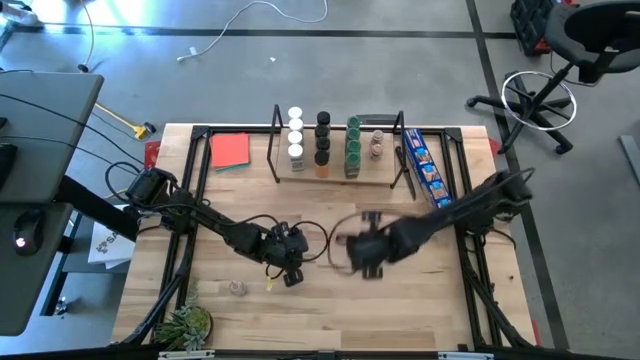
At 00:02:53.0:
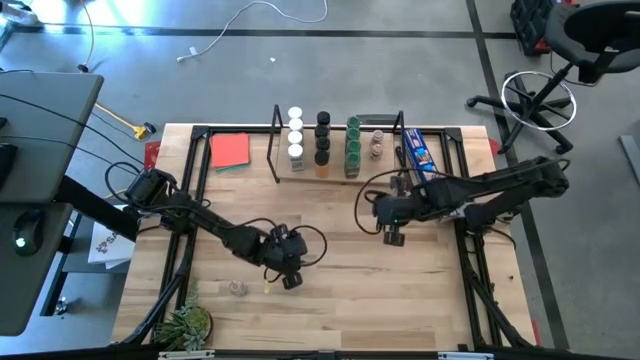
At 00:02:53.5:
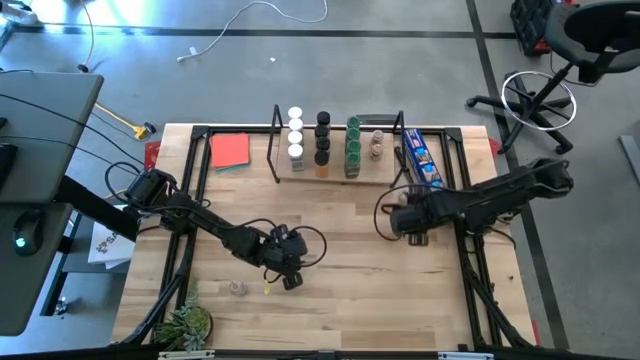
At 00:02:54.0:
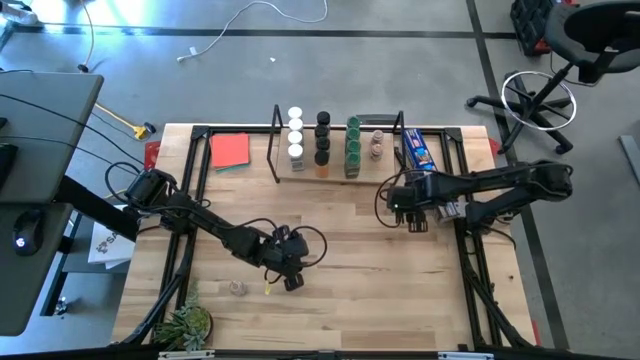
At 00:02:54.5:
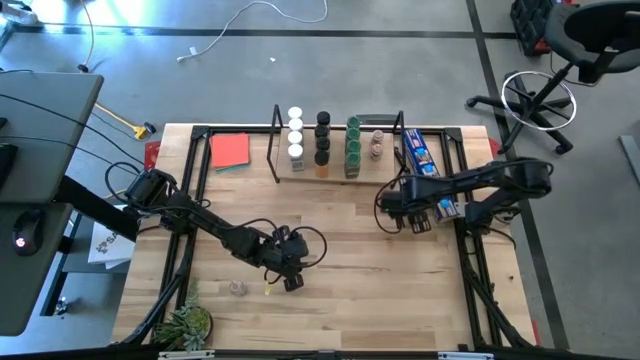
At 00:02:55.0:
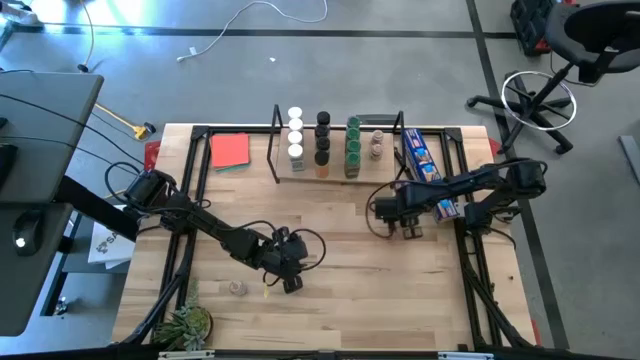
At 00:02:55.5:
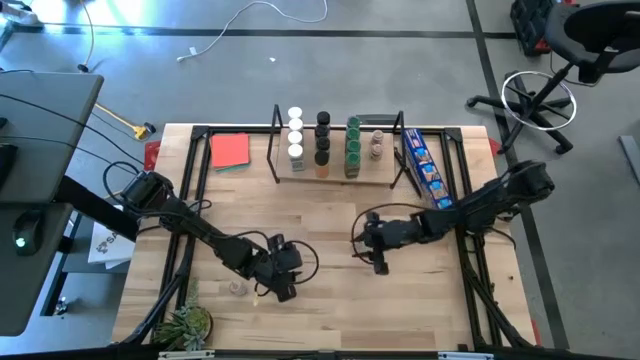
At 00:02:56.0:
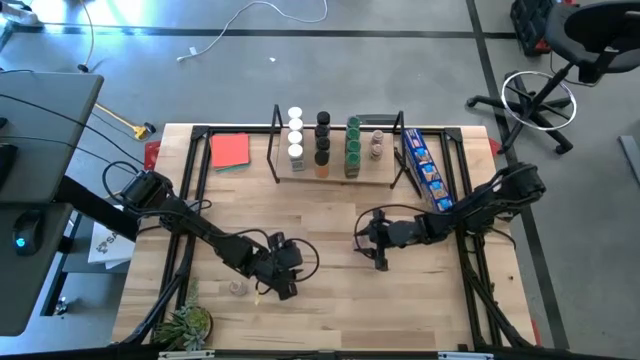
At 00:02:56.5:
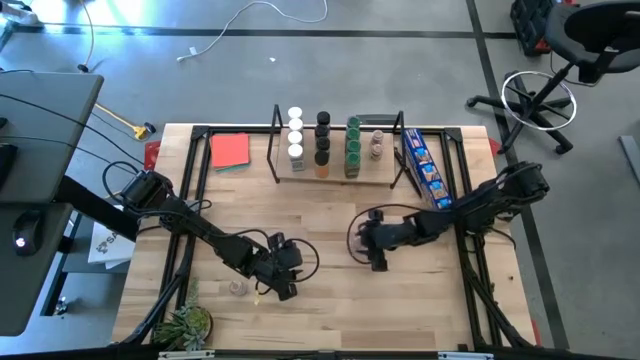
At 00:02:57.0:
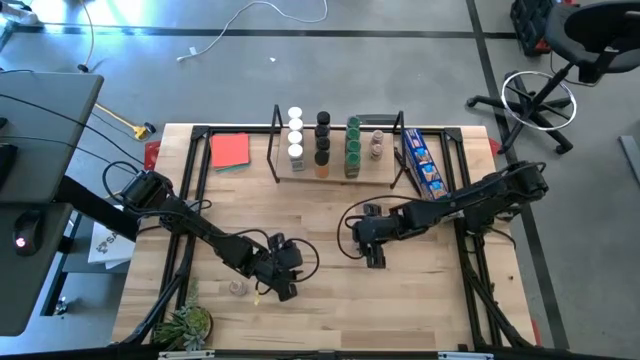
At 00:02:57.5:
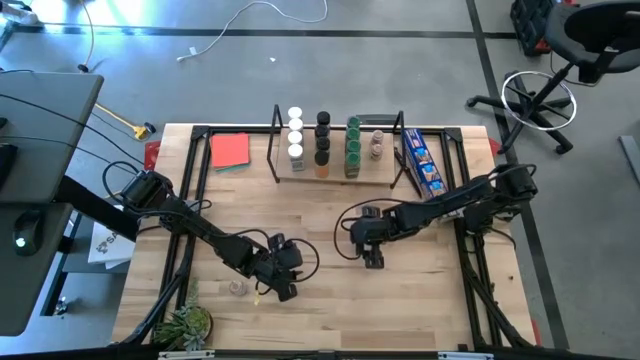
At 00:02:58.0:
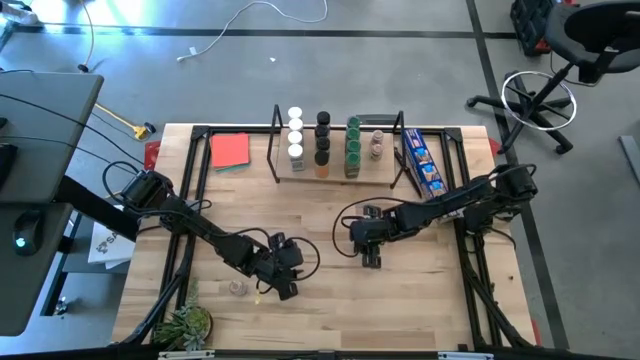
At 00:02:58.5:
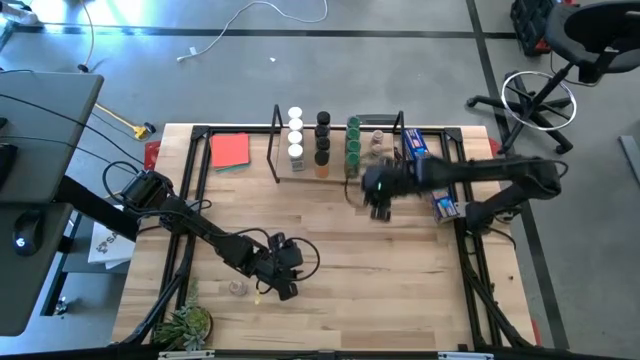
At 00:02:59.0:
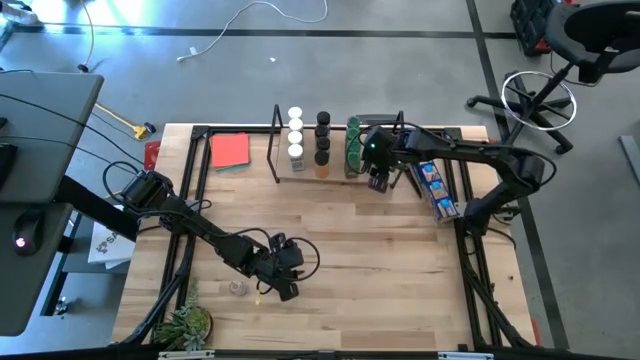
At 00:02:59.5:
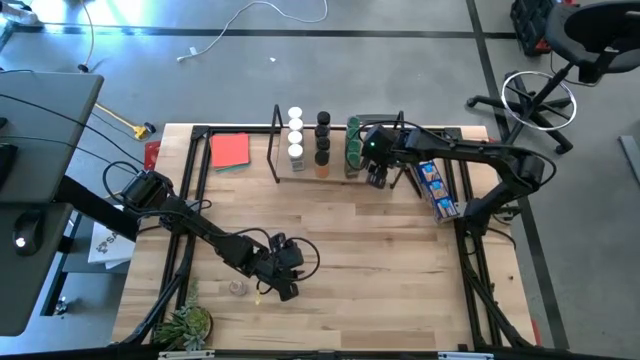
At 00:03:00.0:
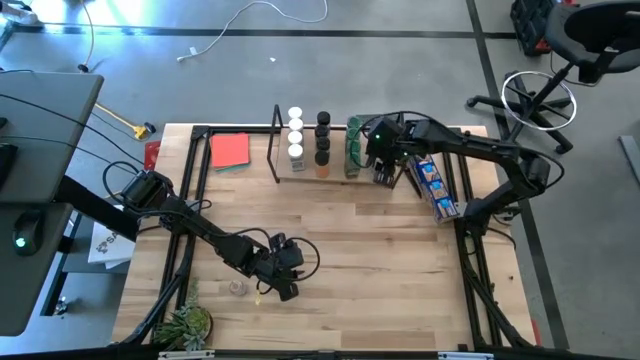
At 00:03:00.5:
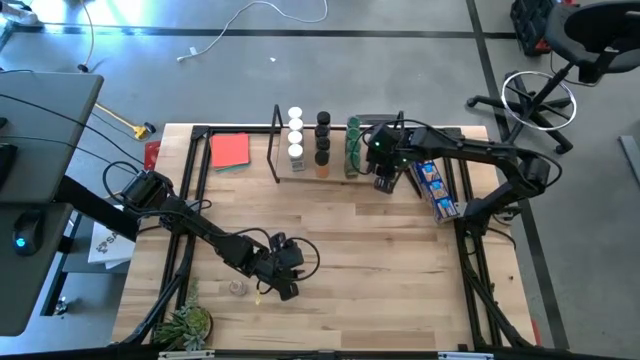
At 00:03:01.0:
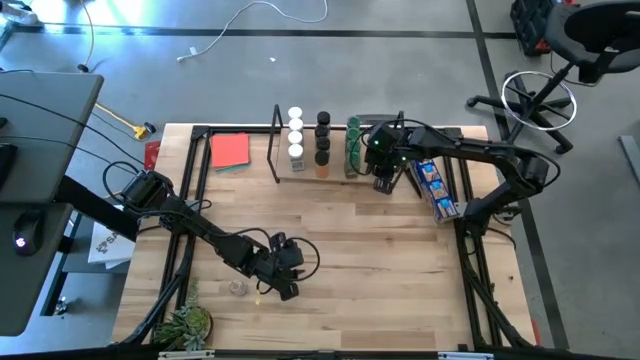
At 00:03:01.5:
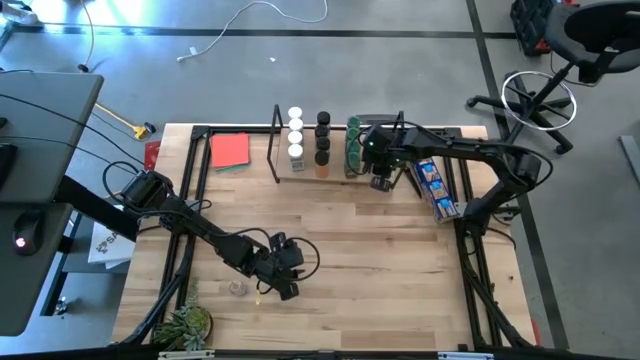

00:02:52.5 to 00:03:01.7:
Task: Shelf spices
Put the brown seasoning bottle on the shelf aligned with the other brown seasoning bottles

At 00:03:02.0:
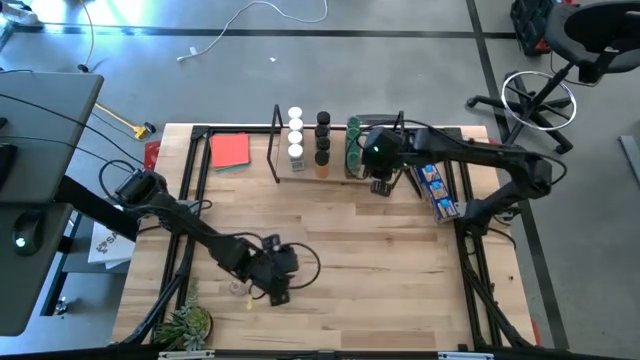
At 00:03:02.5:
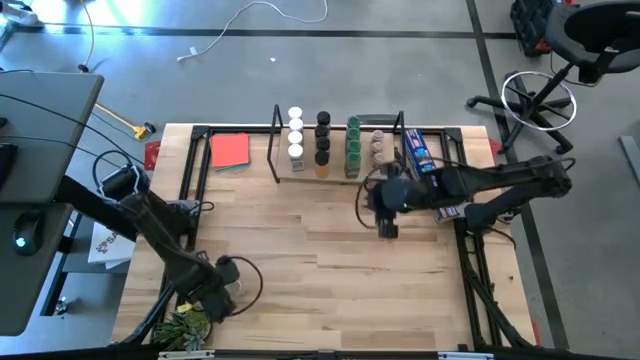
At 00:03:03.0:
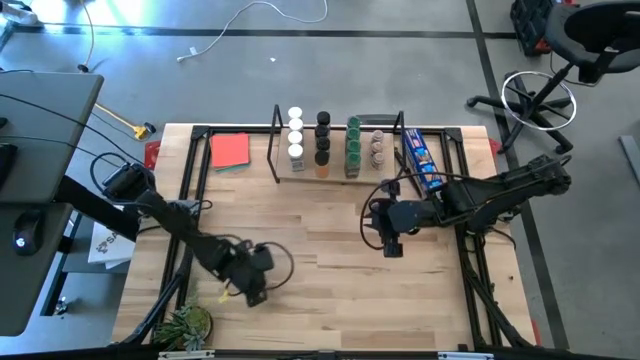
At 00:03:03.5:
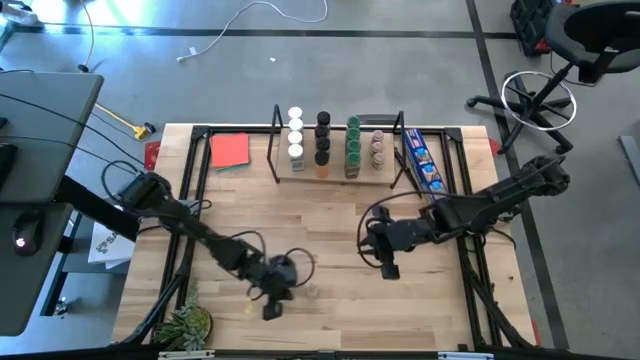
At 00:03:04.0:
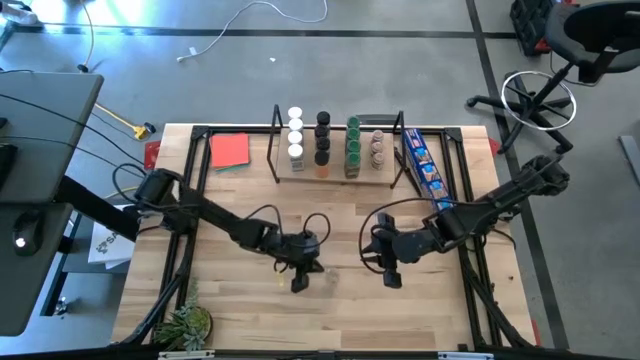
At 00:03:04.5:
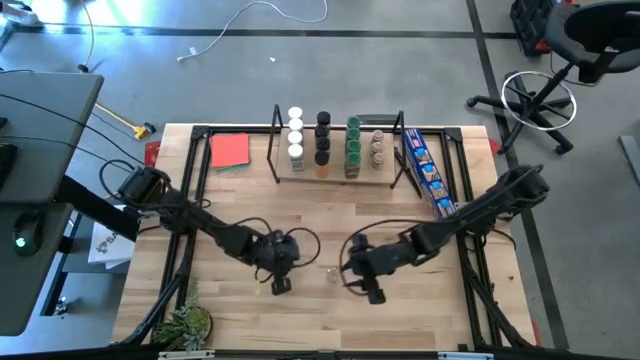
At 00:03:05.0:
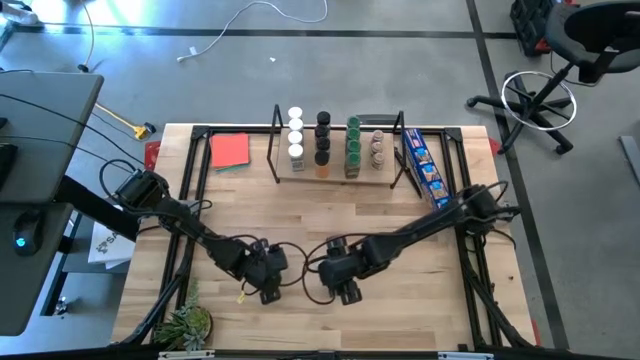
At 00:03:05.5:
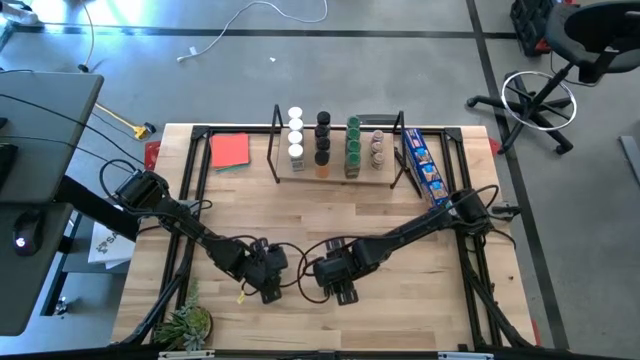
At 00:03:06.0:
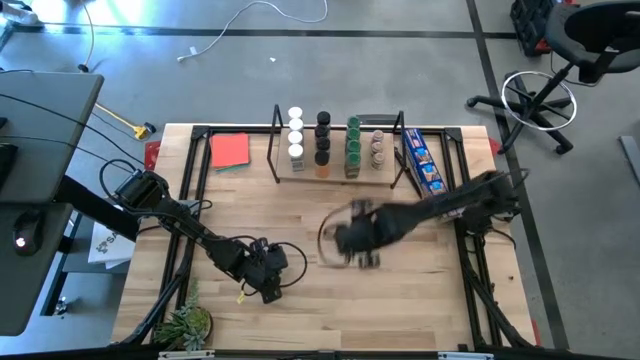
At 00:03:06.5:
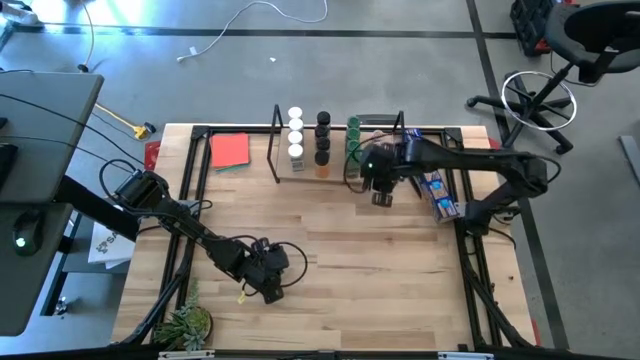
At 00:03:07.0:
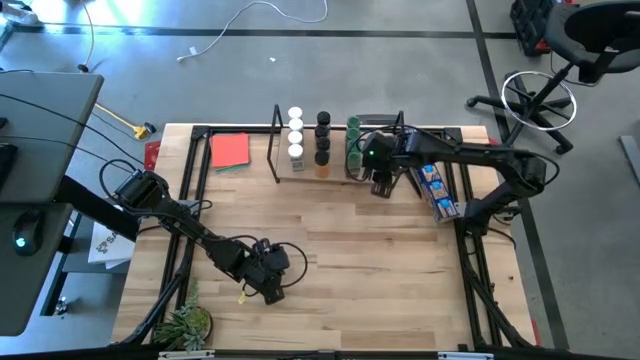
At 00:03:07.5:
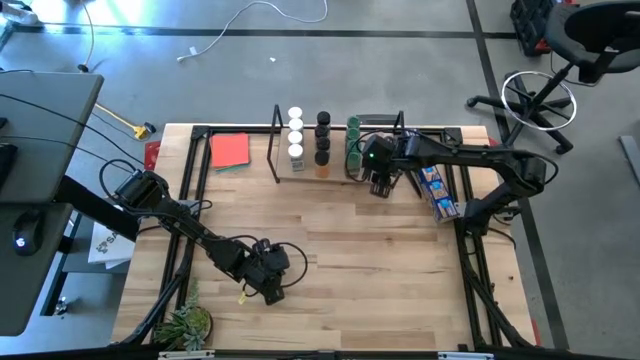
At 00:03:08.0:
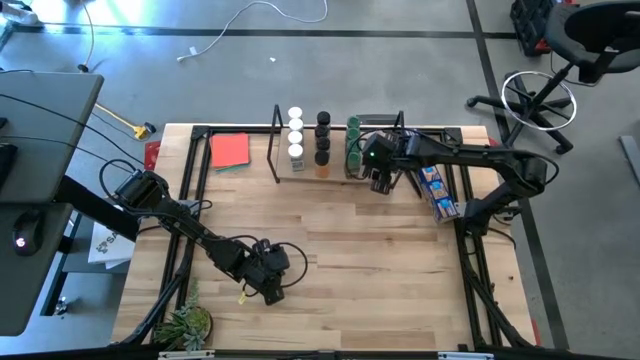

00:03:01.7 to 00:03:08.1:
Put the brown seasoning bottle on the shelf aligned with the other brown seasoning bottles

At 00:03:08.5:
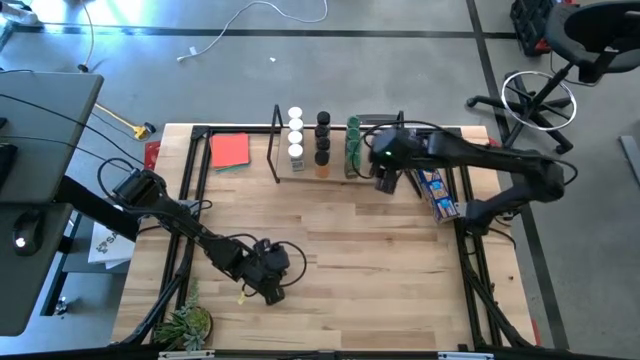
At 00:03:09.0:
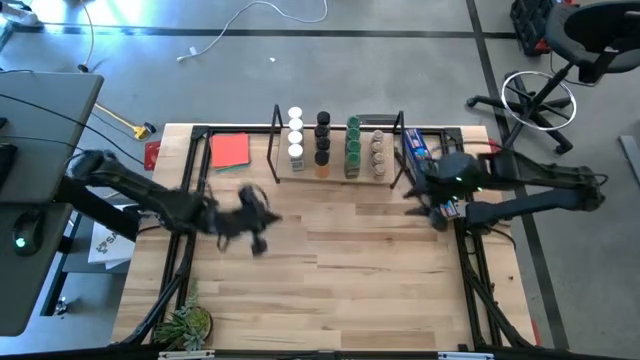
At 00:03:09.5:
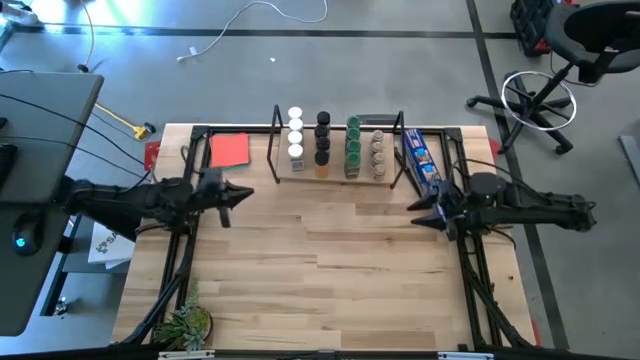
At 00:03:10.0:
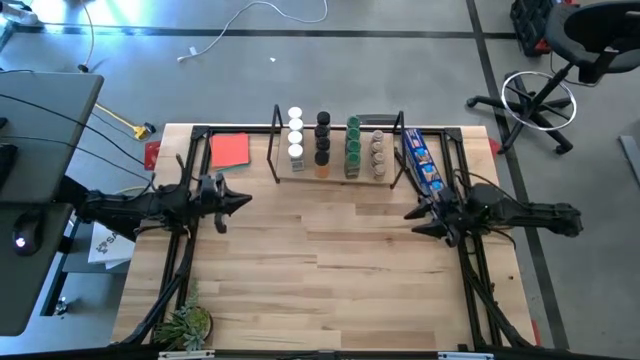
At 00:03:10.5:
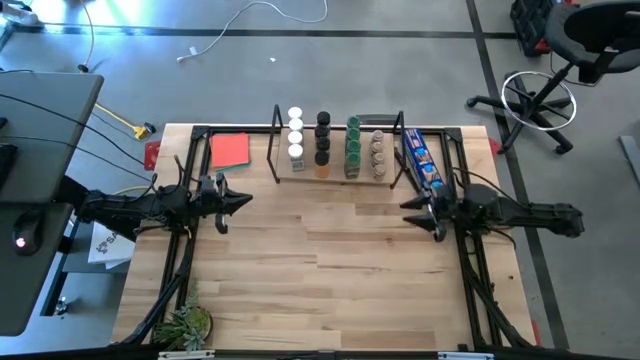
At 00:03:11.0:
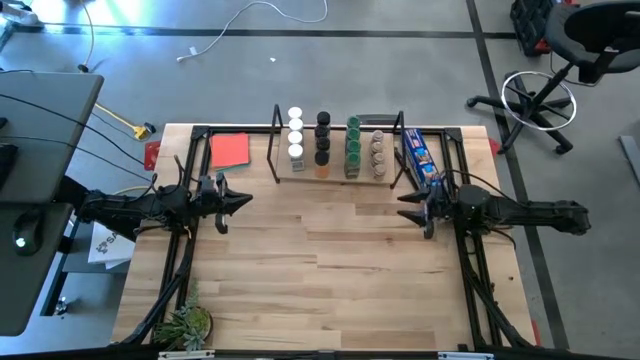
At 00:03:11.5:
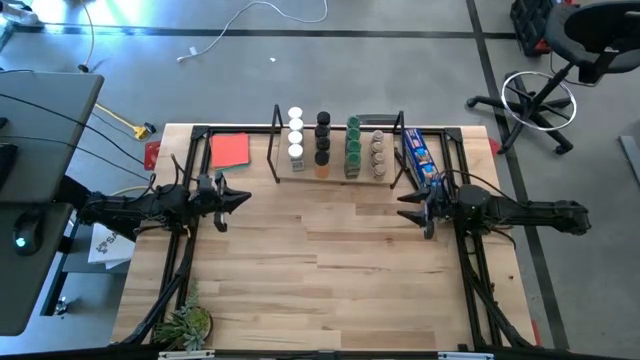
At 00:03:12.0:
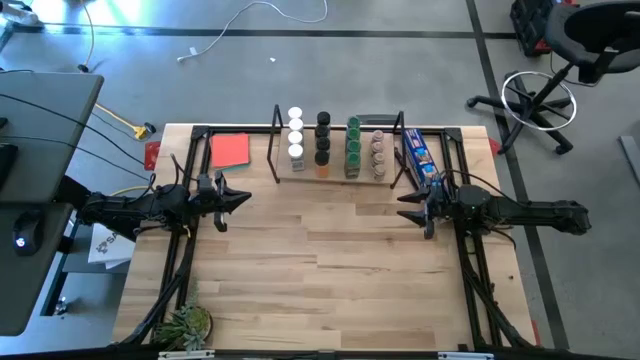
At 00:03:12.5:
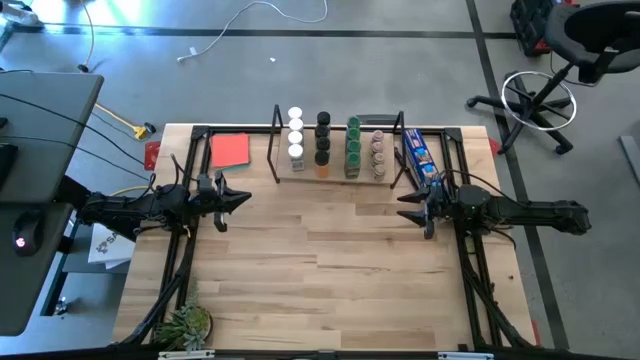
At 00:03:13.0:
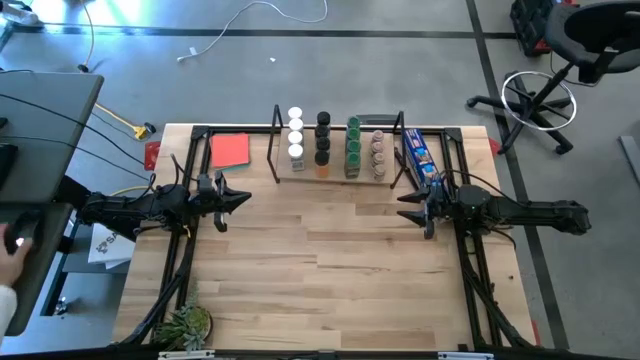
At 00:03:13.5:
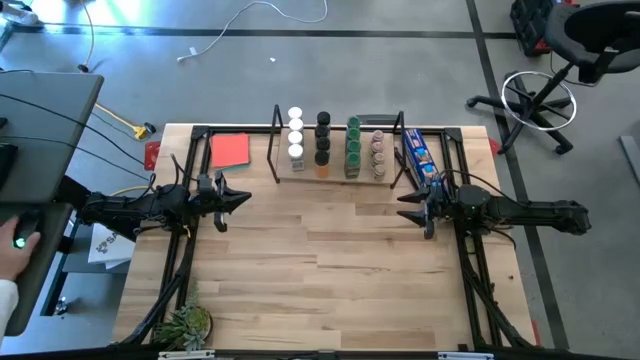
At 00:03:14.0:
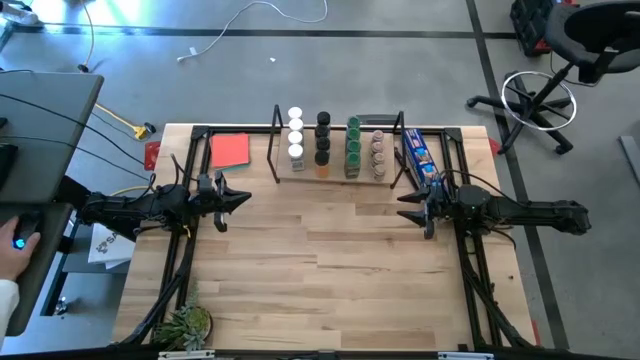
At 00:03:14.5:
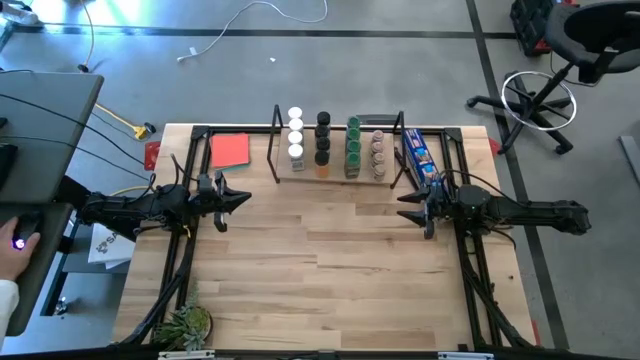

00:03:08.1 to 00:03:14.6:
Return to Home Position
